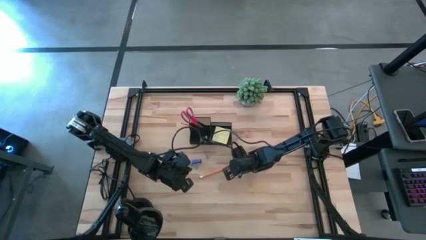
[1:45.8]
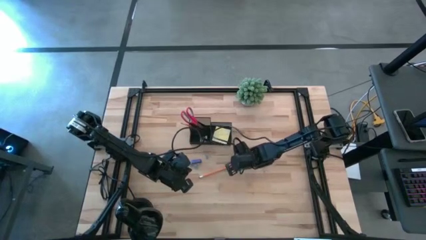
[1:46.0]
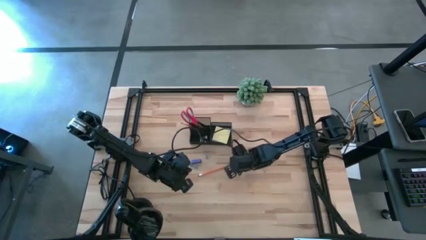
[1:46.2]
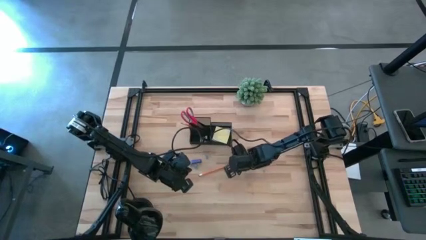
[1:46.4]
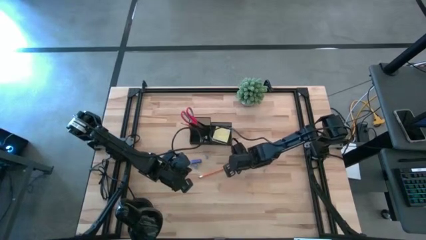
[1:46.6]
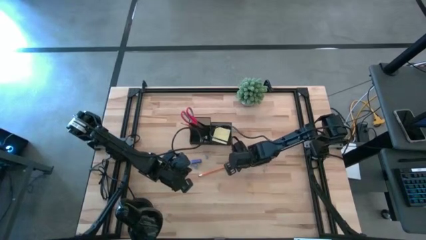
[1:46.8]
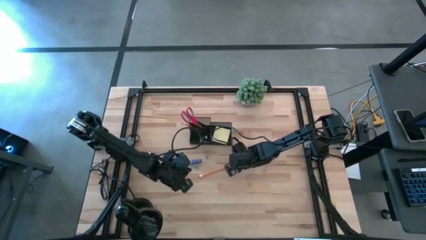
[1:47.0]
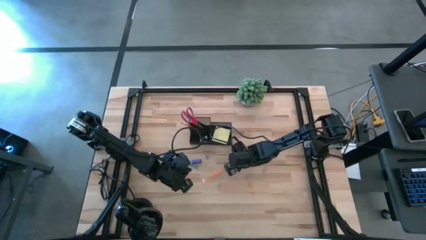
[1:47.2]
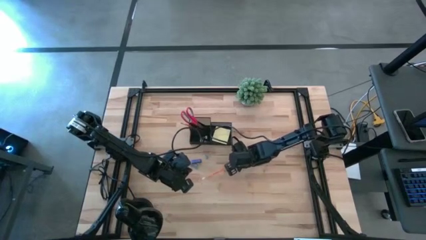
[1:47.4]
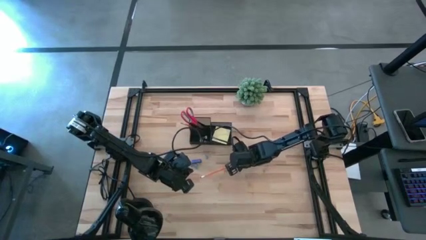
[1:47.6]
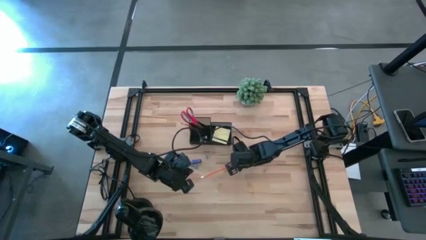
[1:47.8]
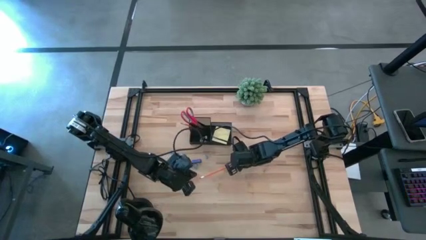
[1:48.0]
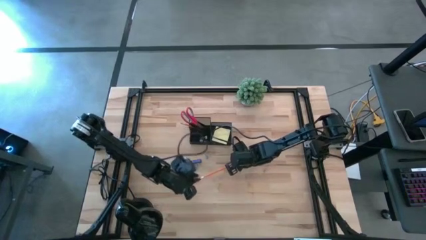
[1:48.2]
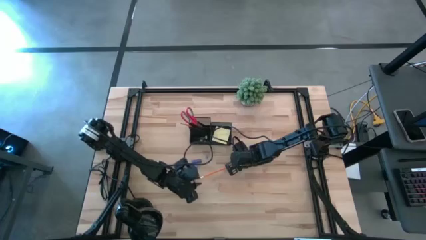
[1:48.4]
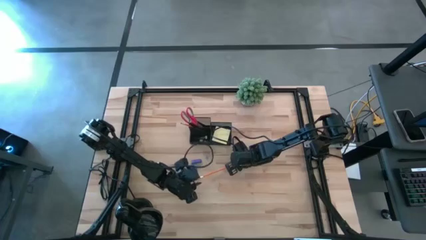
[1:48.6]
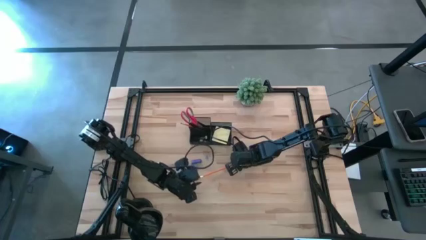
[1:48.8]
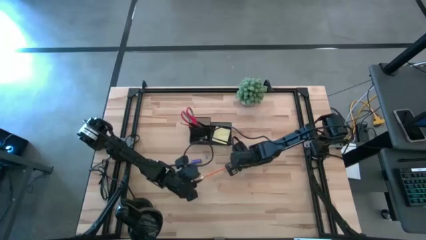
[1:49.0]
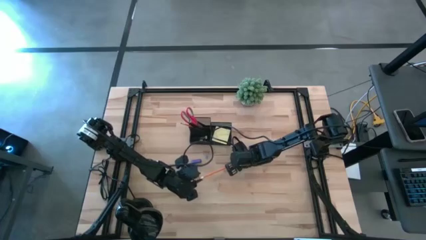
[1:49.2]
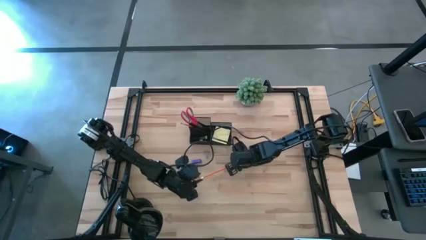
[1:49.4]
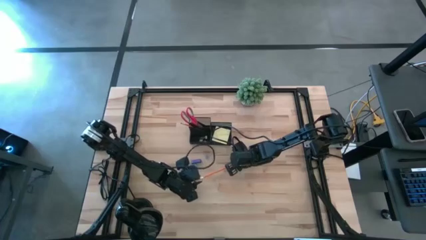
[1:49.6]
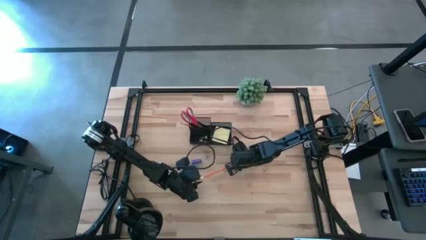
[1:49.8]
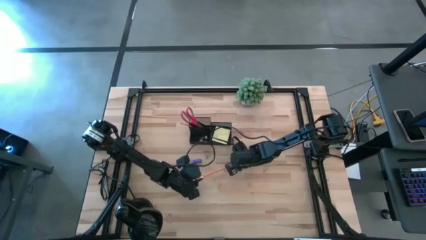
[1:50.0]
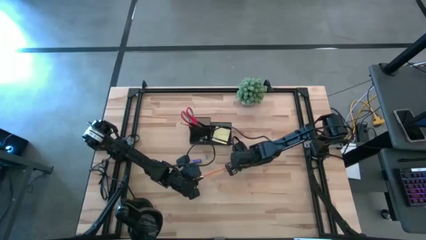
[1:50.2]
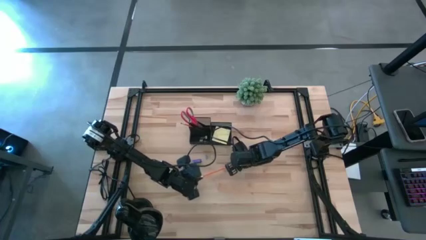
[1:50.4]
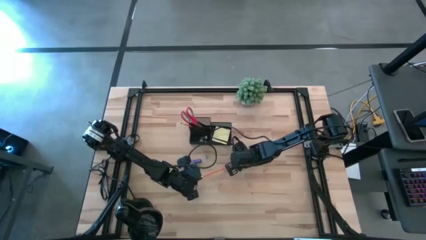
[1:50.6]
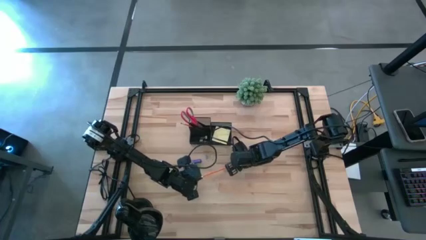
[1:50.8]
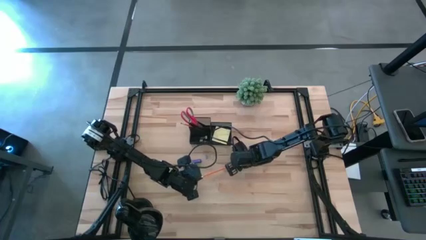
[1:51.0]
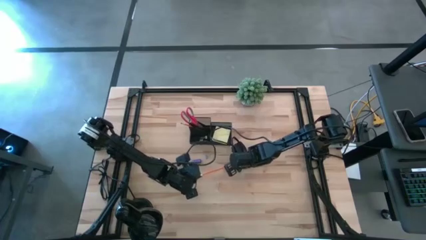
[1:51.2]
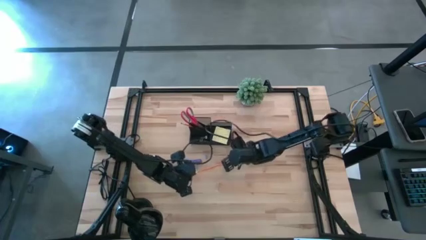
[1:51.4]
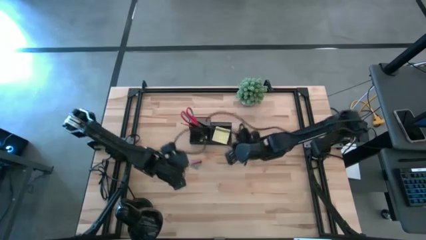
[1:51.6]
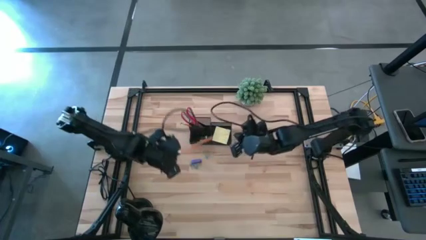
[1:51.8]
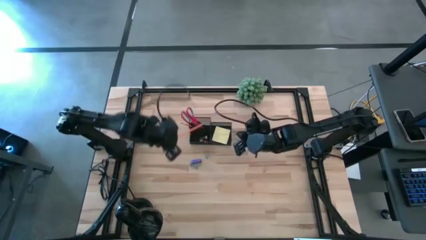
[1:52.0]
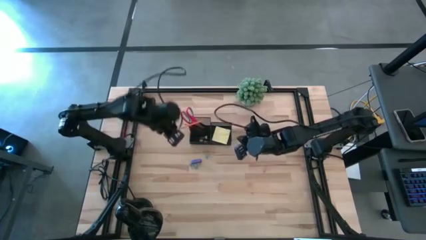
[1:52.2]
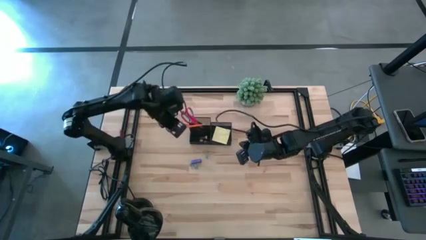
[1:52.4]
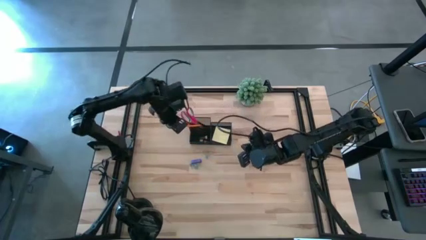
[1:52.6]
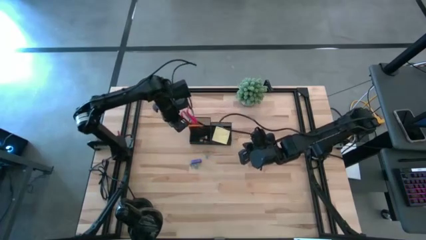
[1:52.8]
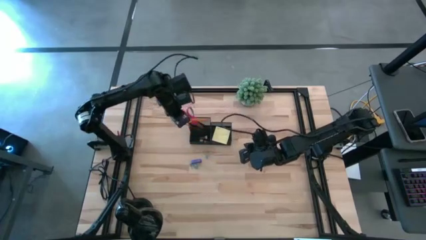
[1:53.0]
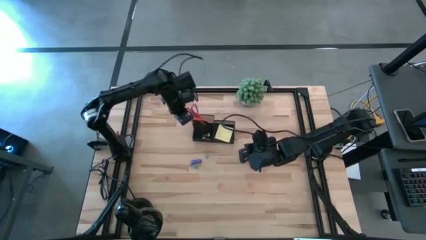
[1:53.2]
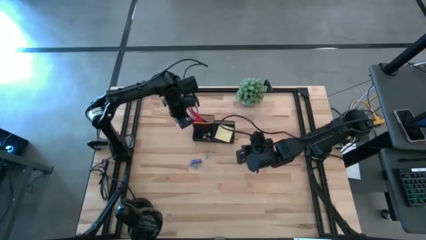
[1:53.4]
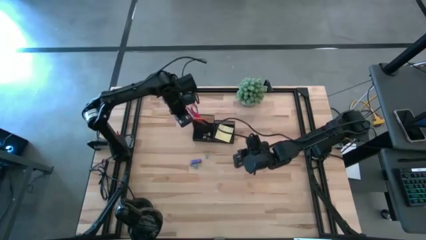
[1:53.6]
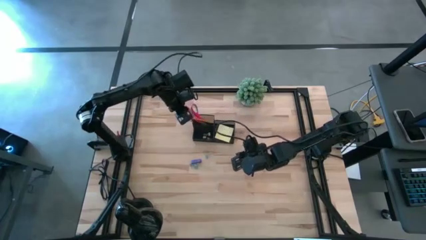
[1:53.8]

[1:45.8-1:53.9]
Task: Pick and place office supplies into organizer
Put the orange pencil into the desk organizer

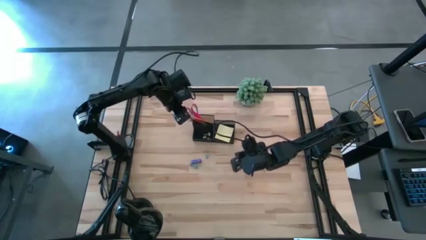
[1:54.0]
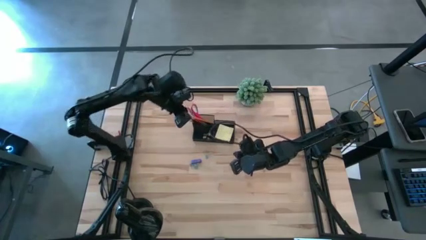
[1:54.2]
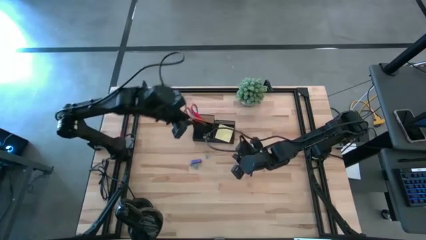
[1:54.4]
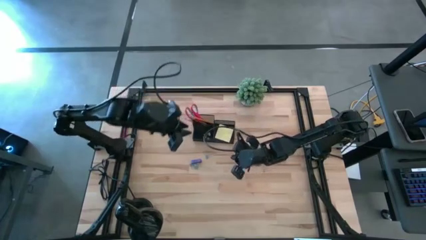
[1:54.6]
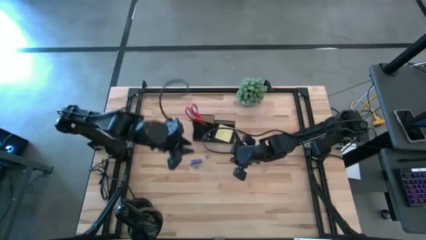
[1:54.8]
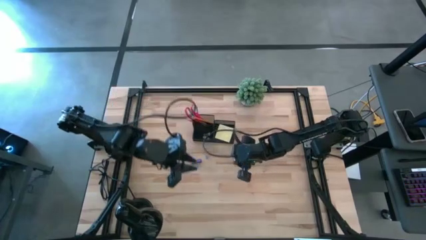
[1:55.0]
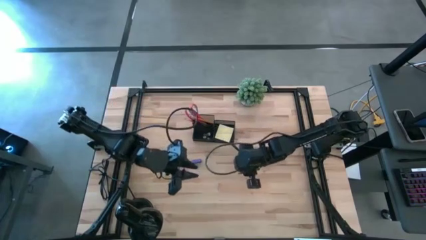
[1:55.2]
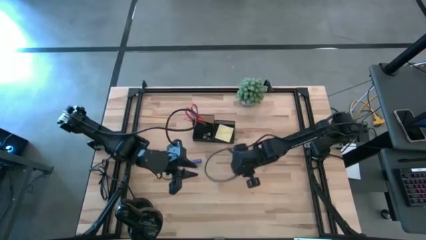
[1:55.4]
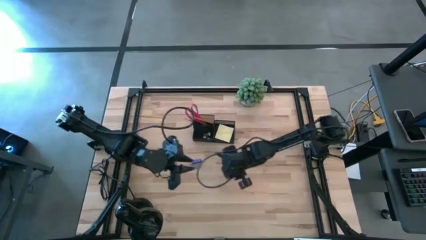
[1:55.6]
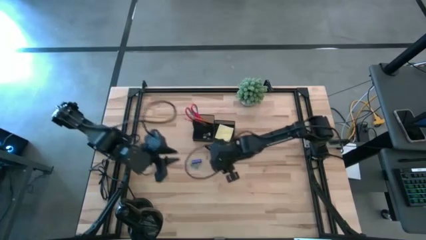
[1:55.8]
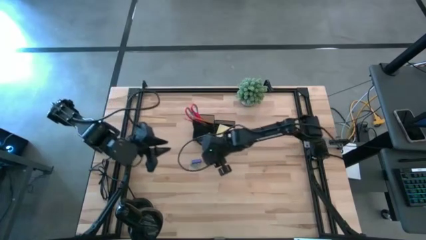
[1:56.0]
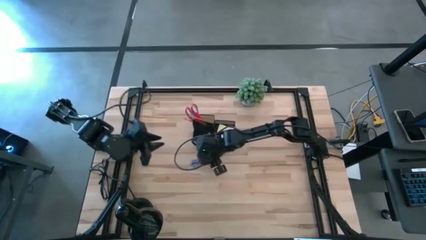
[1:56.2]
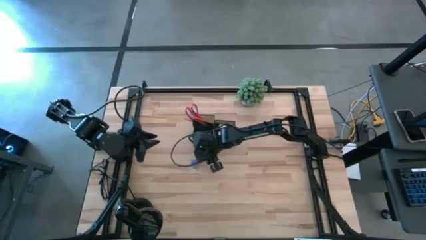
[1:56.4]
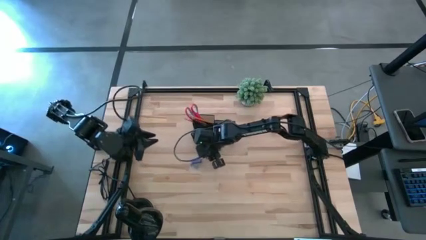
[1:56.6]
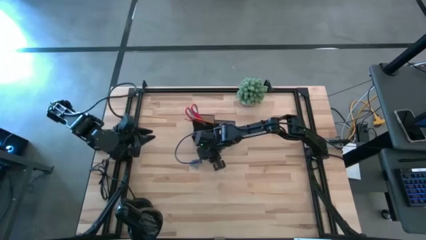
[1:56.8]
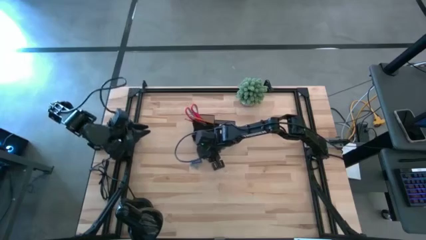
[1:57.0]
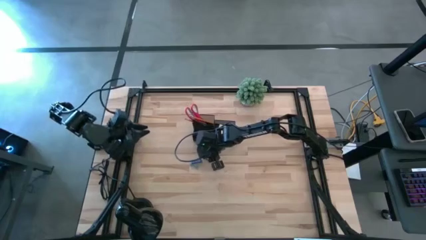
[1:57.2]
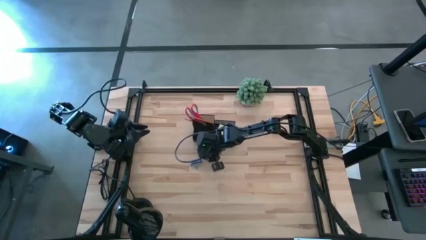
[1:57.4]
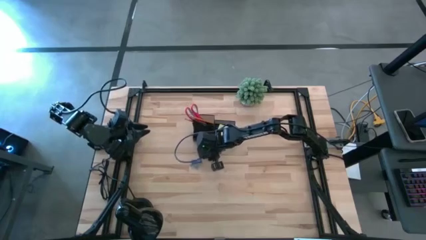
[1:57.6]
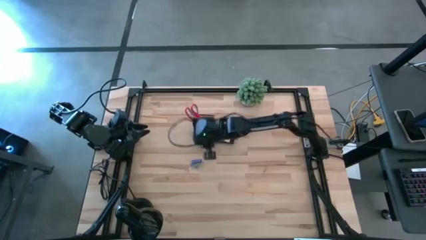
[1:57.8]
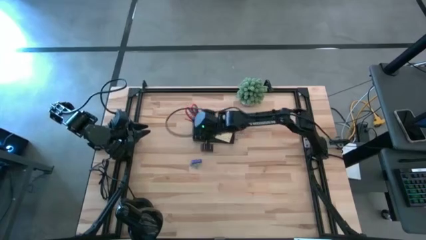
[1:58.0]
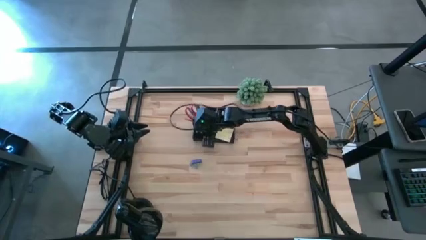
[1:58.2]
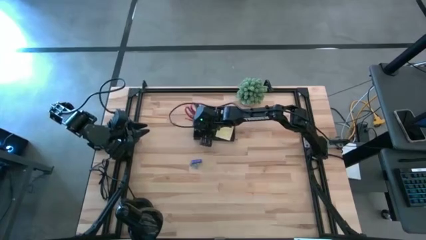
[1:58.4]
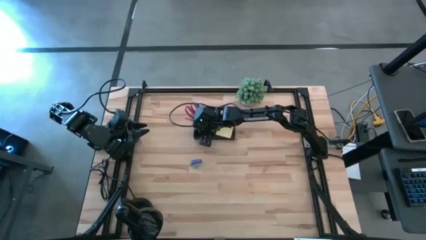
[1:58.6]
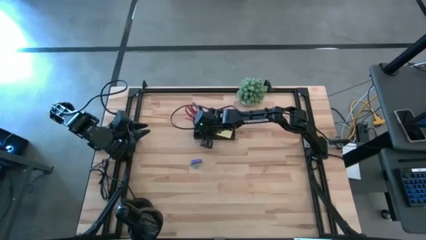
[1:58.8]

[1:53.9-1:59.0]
Put the right blue binder clip into the desk organizer

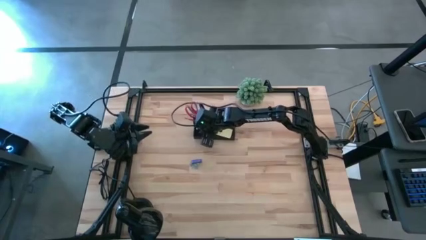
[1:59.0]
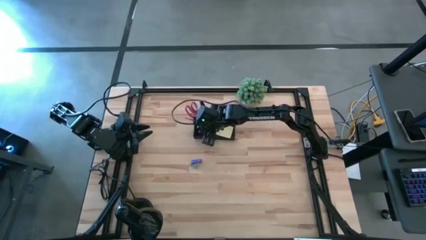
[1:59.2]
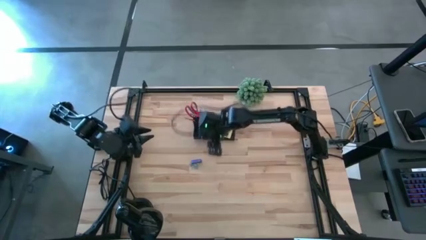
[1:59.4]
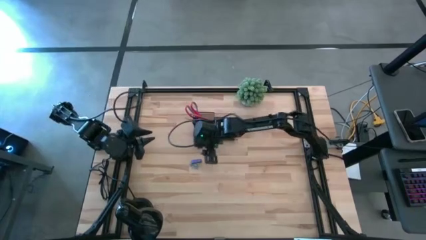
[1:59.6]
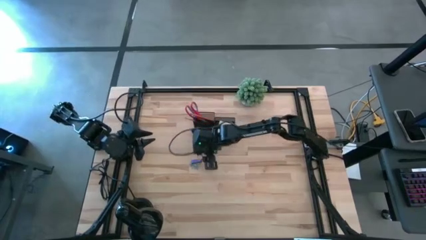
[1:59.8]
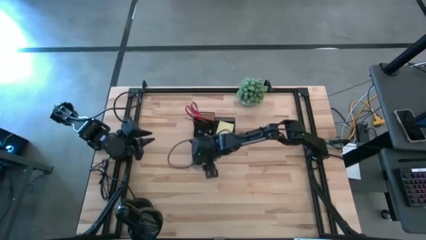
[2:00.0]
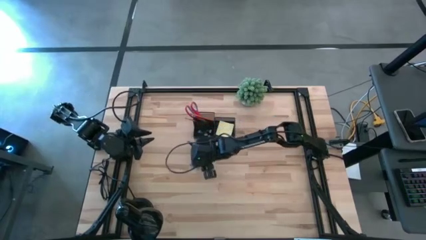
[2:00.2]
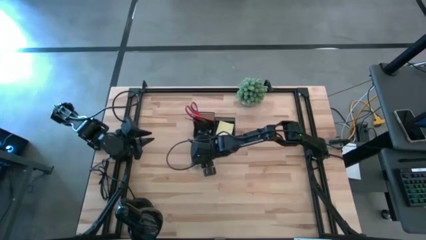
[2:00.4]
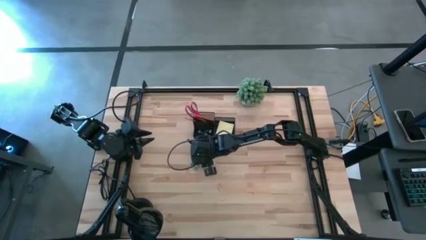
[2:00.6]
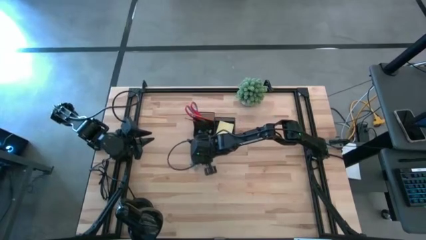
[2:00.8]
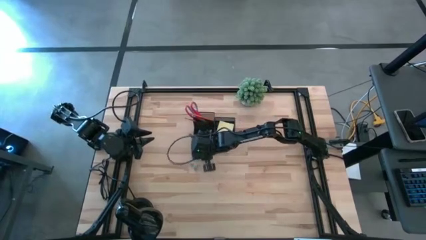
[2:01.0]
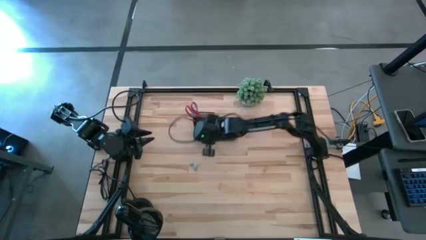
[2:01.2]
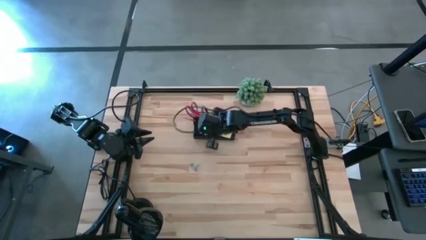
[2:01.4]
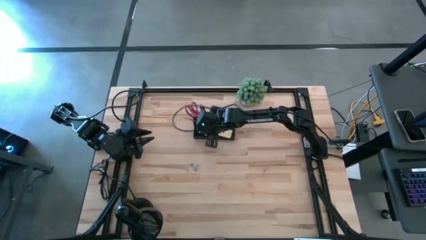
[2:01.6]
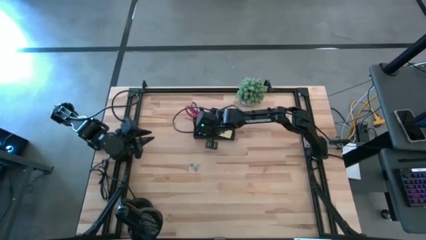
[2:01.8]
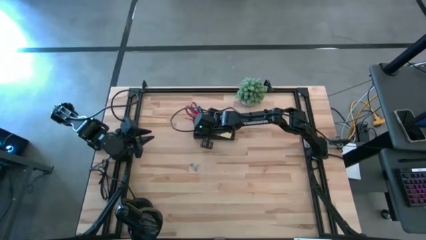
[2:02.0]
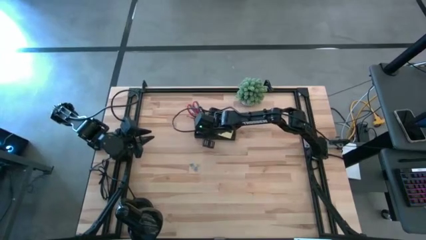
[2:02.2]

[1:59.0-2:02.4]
Put the violet eraser into the desk organizer
